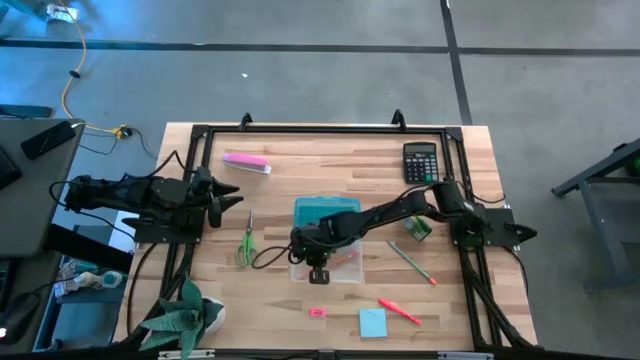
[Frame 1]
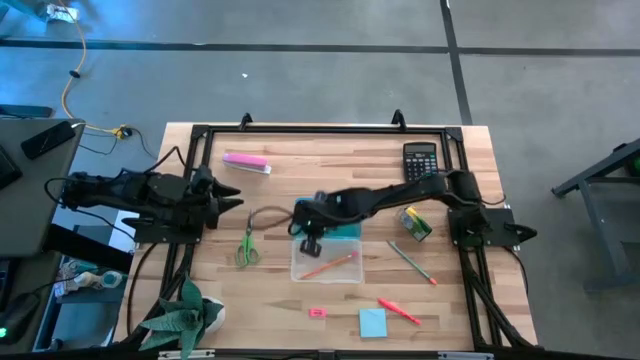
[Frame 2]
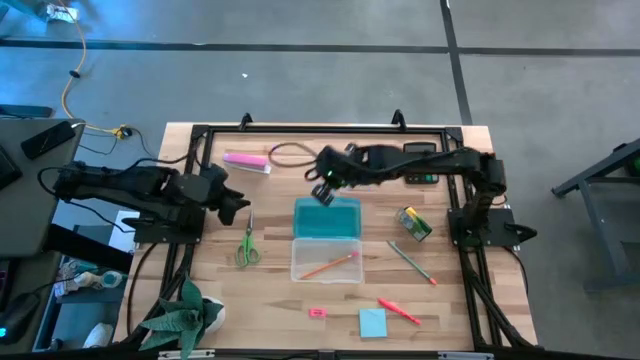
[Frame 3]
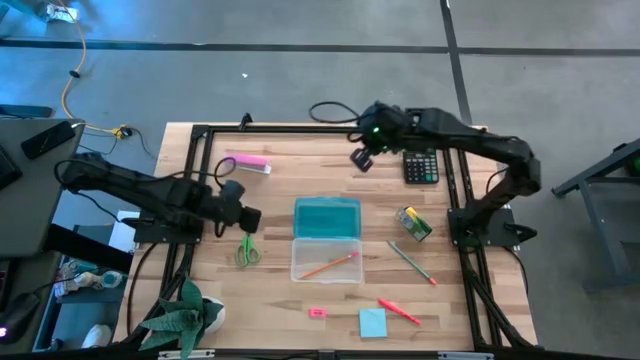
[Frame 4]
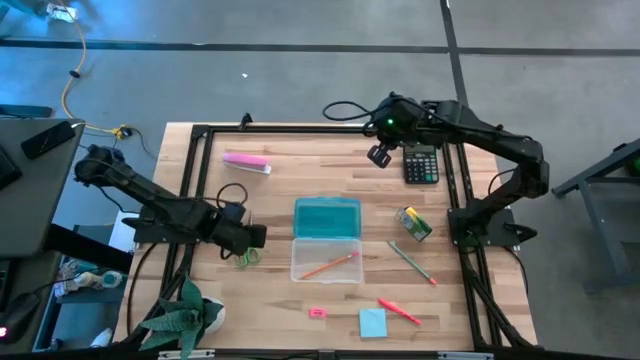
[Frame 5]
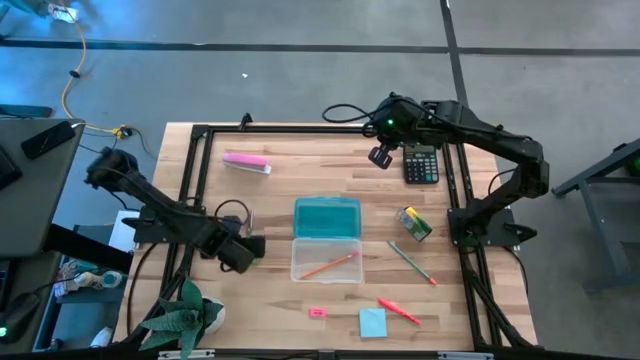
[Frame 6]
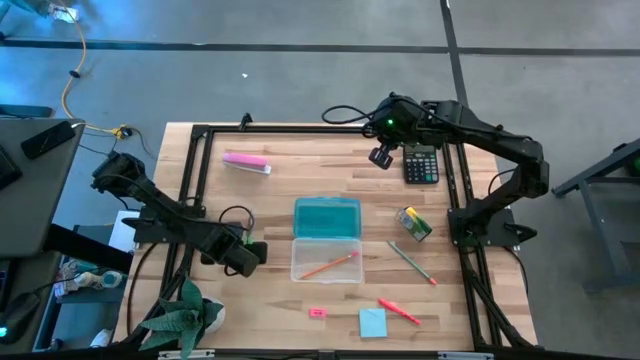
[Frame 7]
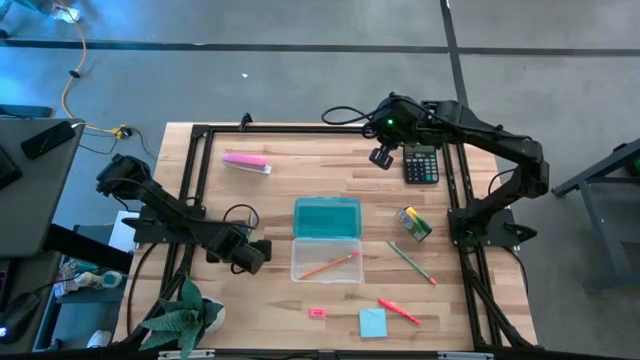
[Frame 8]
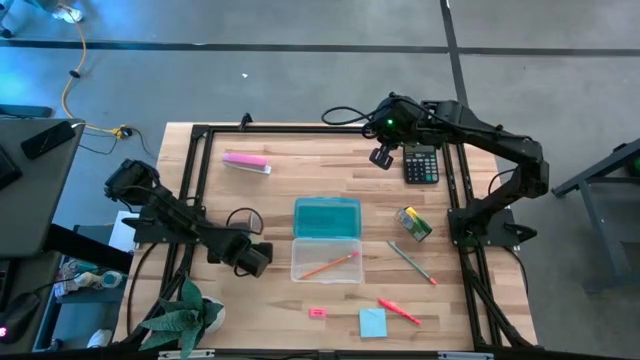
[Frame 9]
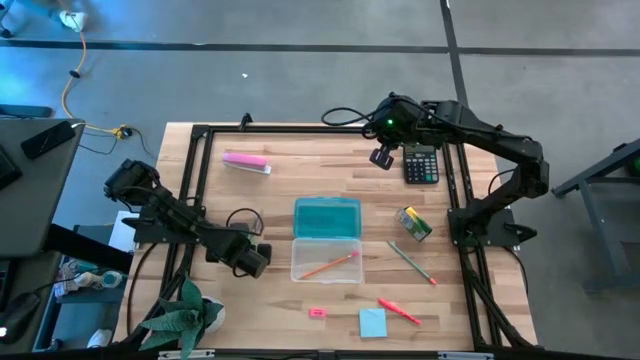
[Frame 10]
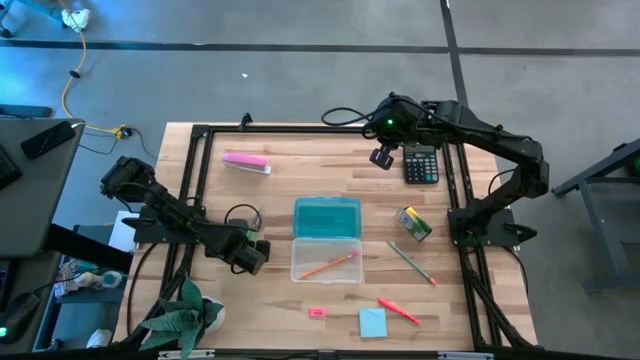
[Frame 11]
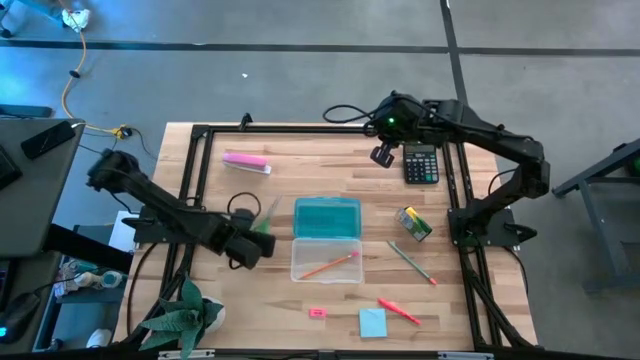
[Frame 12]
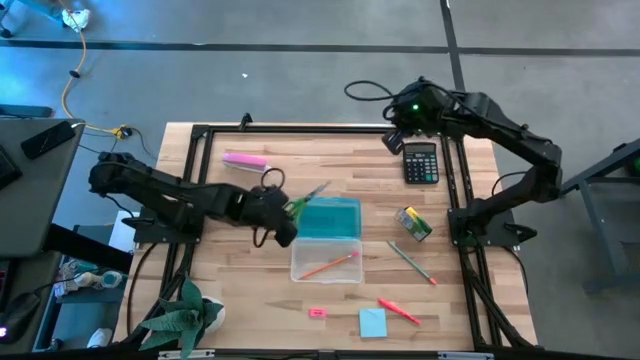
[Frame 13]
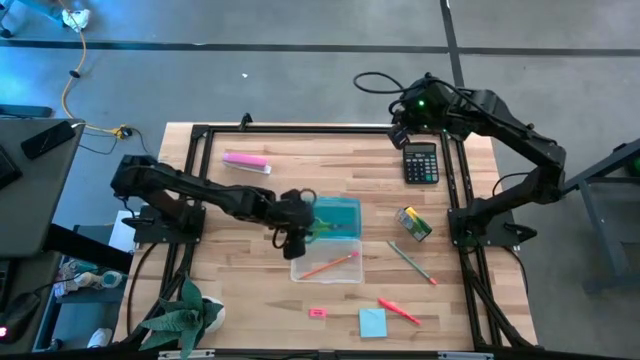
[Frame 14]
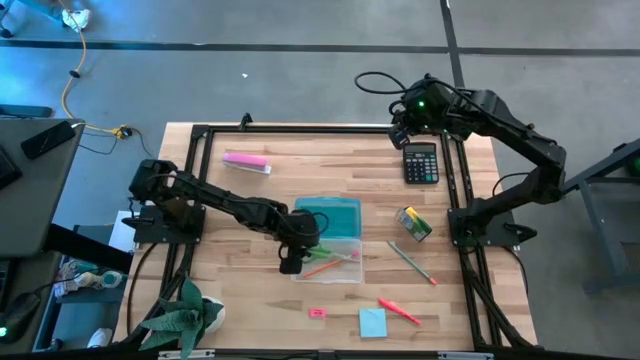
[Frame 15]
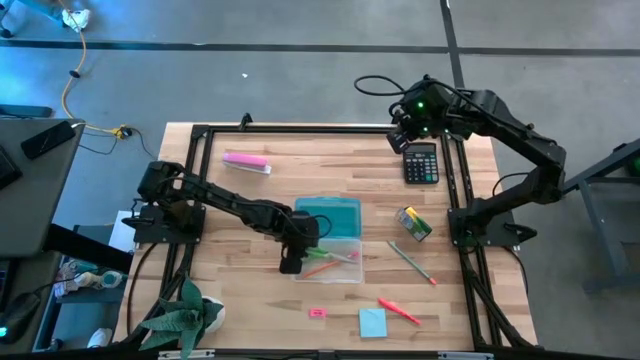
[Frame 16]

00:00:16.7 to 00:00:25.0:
Task: Pack school essentials
Put the green scissors into the supply box

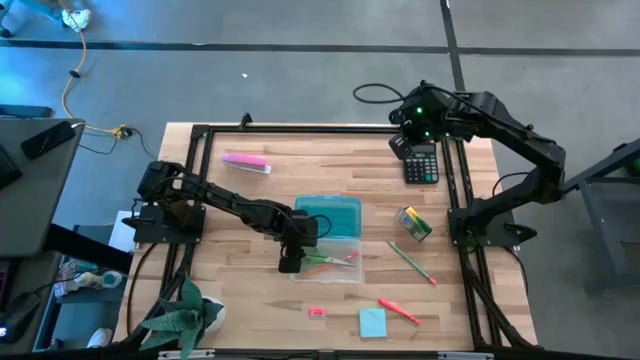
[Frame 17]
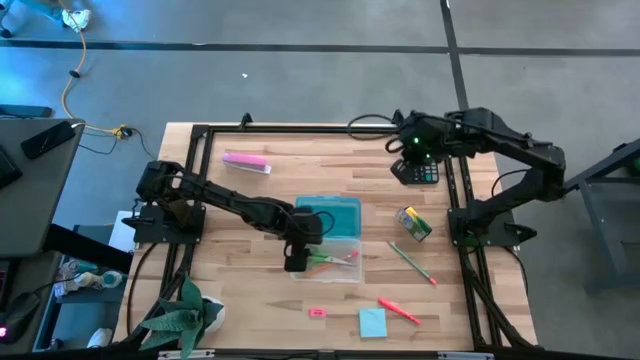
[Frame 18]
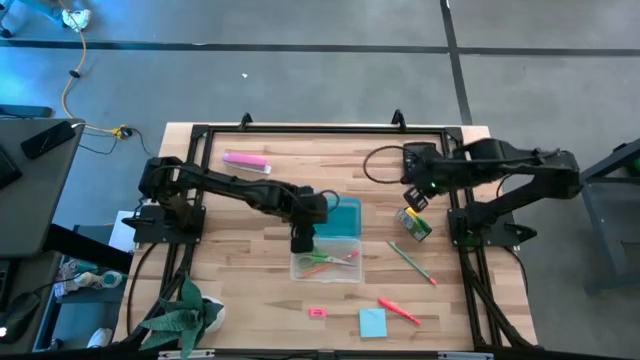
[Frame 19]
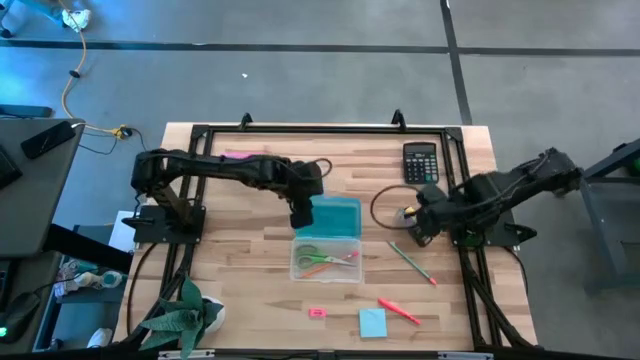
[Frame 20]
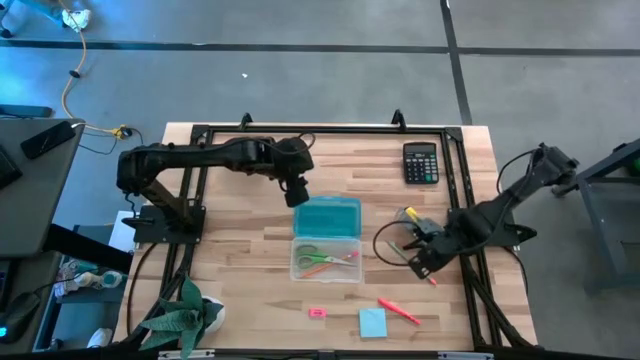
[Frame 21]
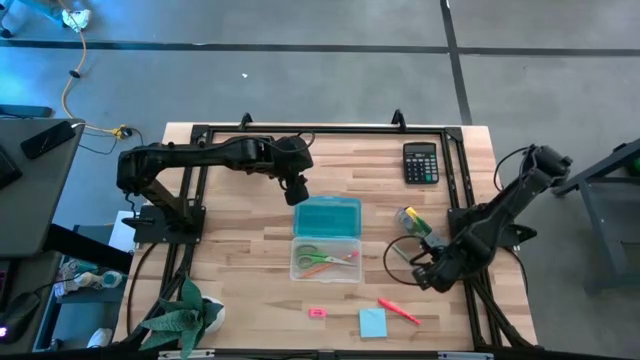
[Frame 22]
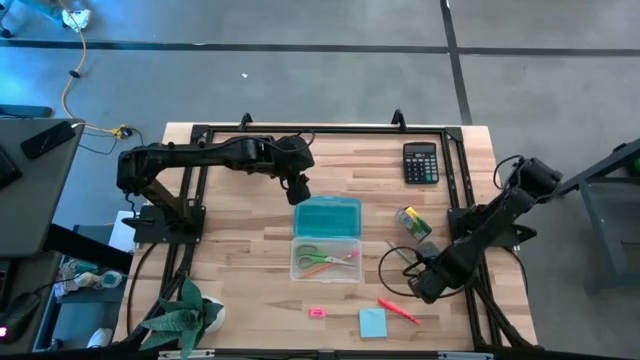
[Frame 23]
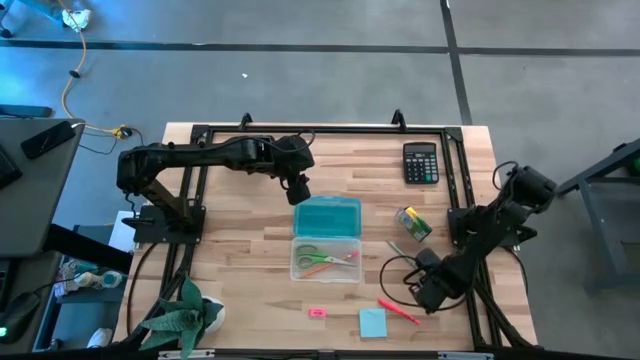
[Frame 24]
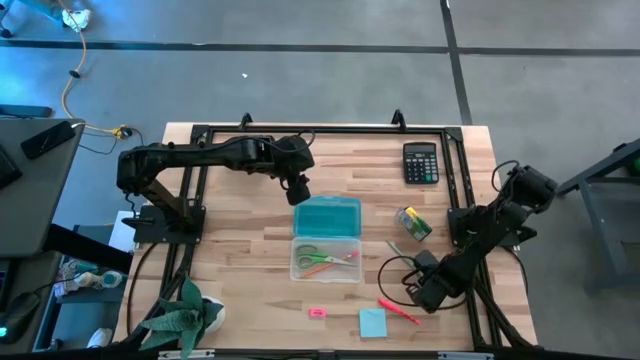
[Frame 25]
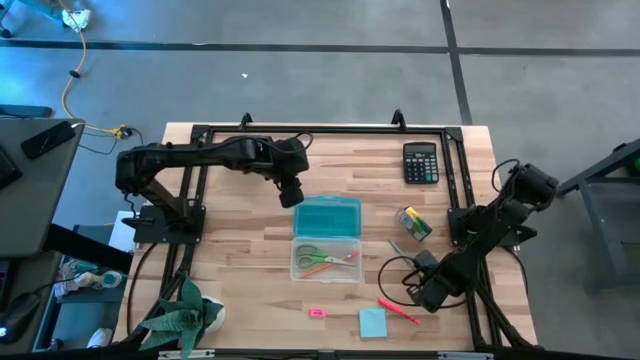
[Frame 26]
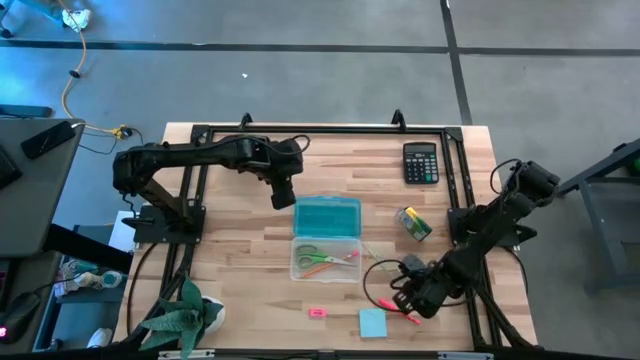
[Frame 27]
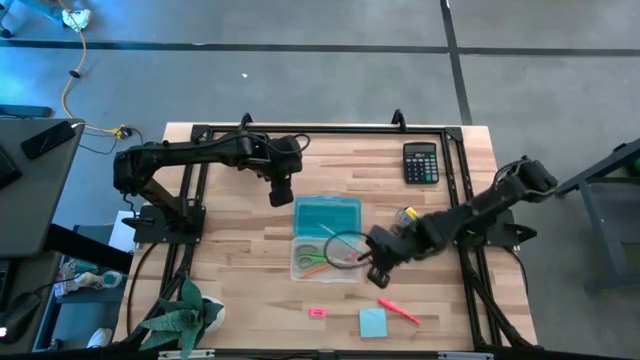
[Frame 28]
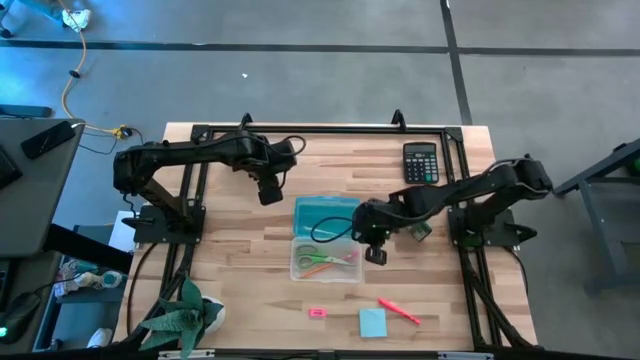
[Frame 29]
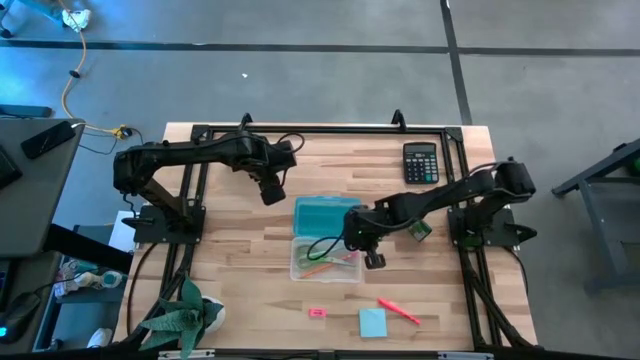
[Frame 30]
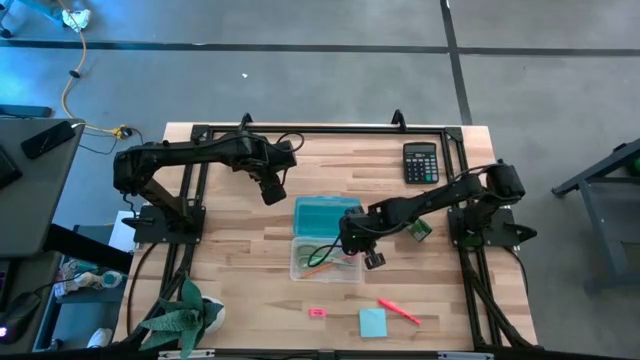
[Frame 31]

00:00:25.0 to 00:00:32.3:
Put the blue pencil into the supply box

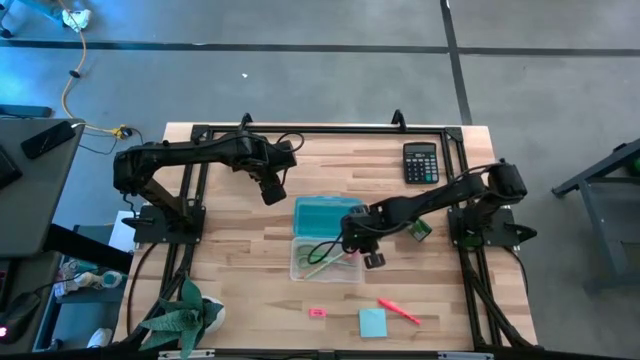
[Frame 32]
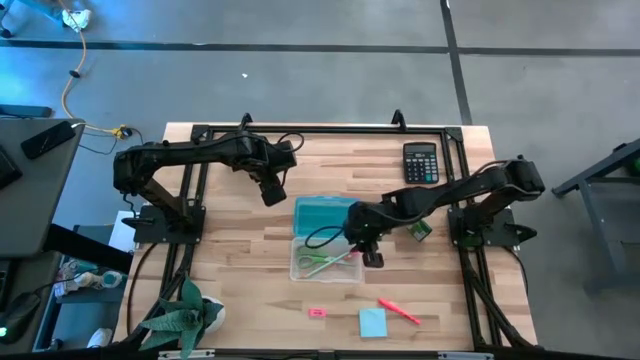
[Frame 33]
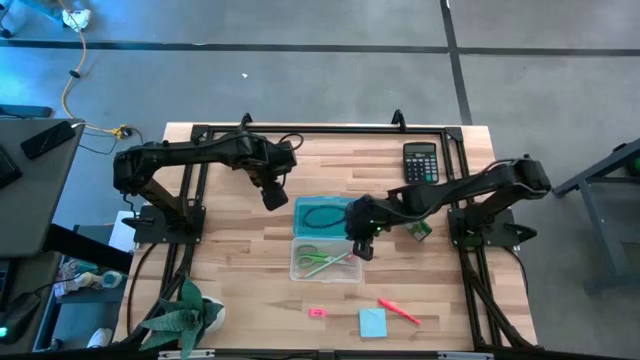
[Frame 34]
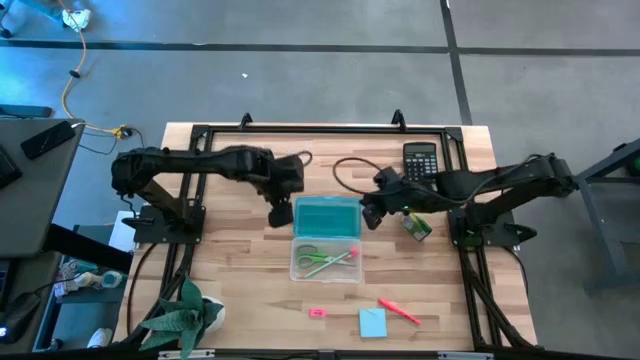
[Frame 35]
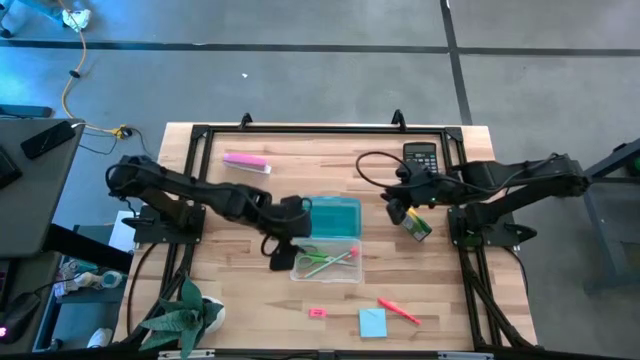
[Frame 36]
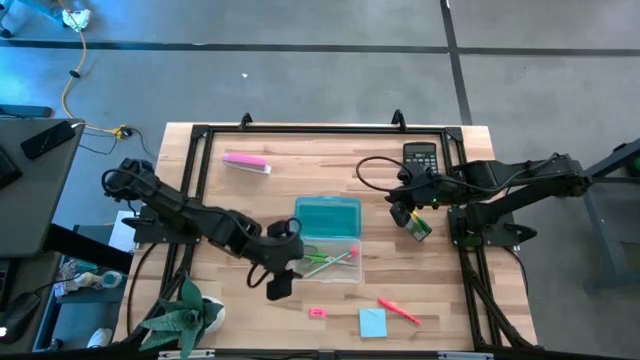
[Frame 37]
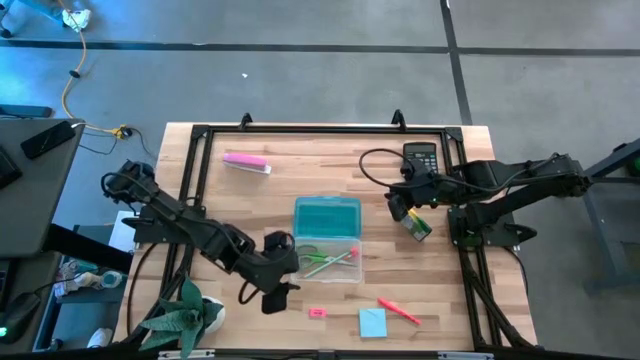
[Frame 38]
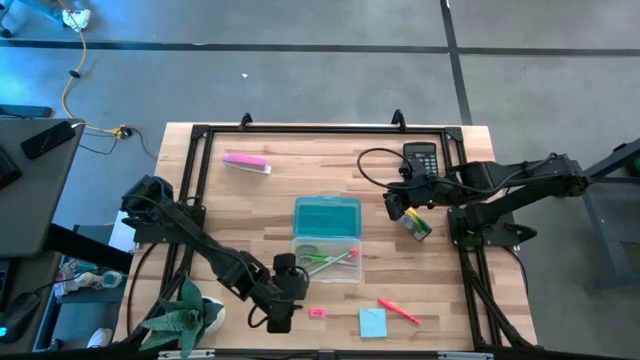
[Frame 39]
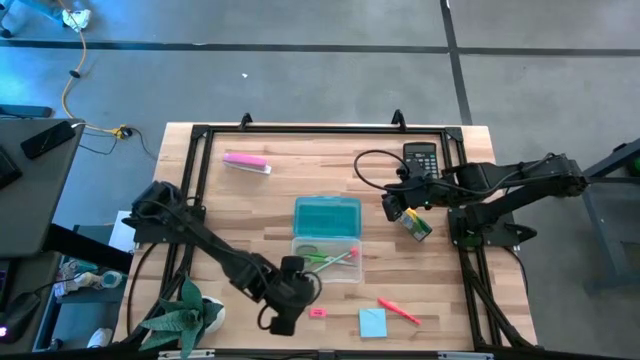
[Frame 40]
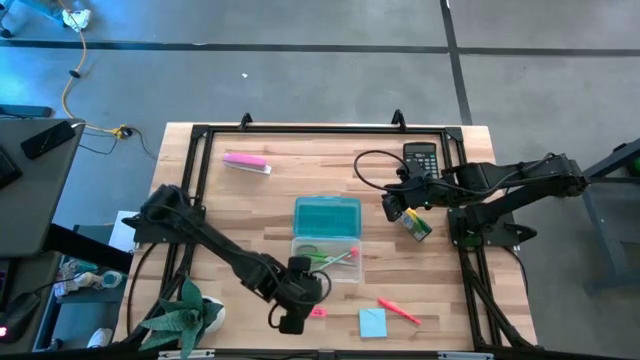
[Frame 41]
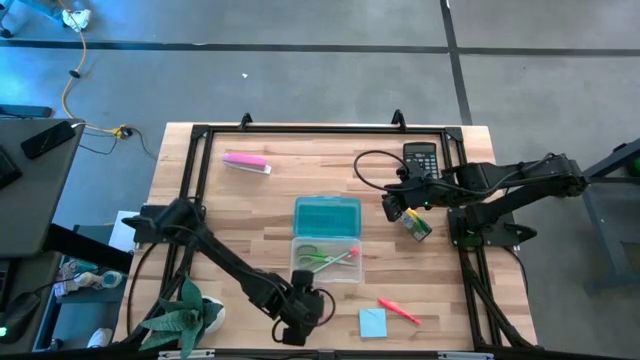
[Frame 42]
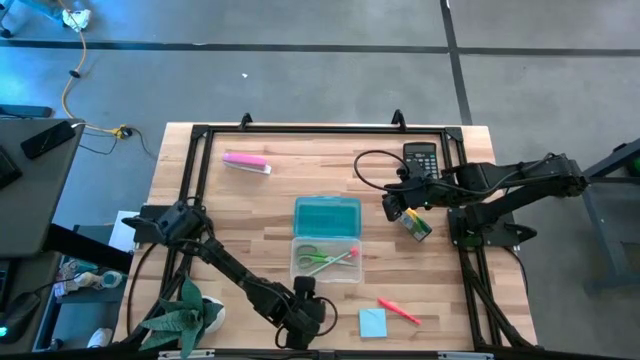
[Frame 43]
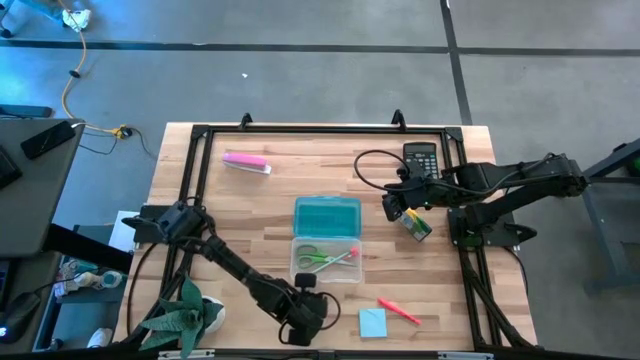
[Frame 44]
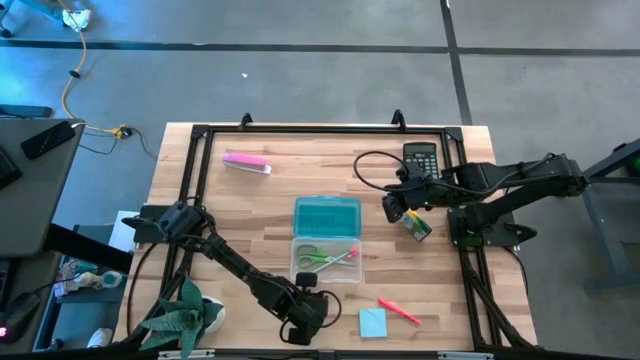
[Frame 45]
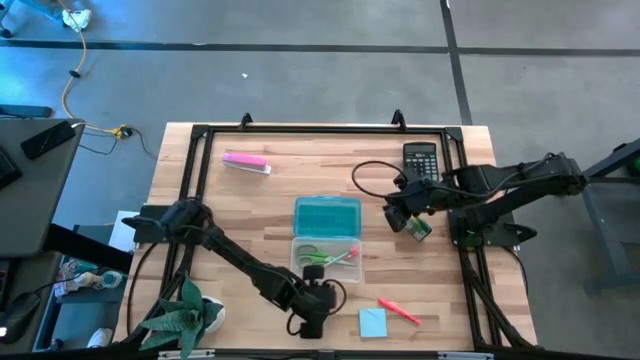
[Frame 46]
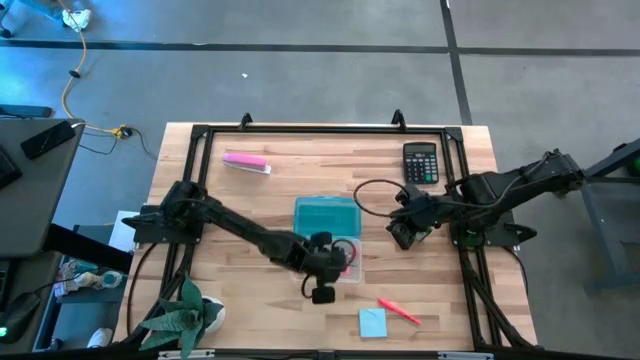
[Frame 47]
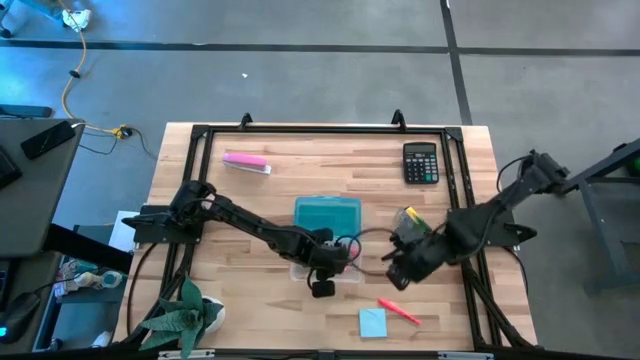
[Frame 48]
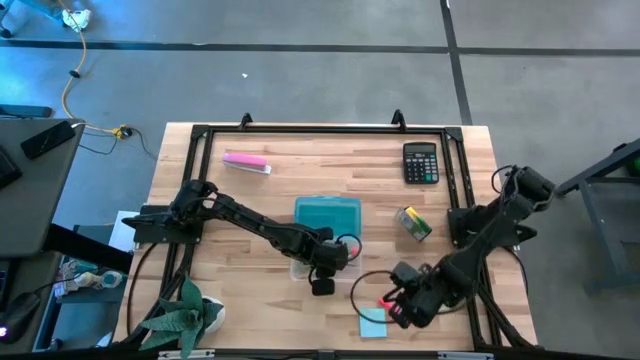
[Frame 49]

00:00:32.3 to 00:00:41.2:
Put the pink eraser into the supply box
